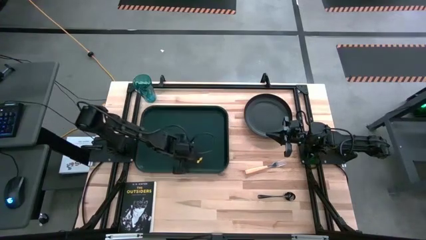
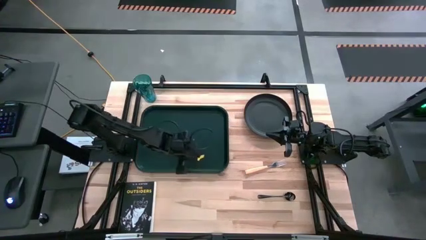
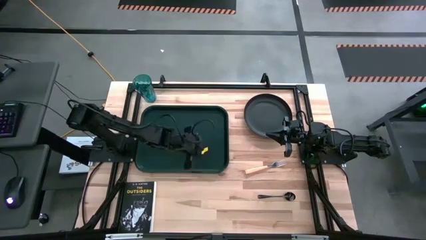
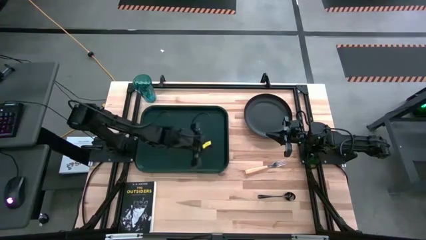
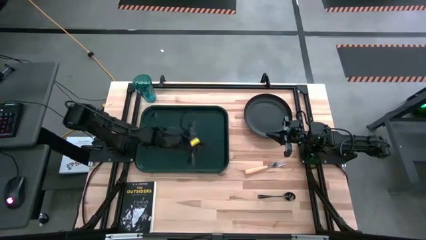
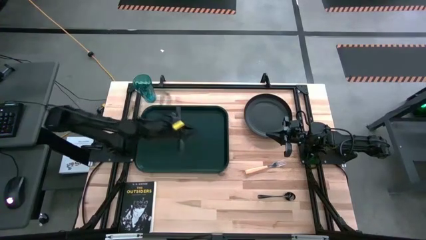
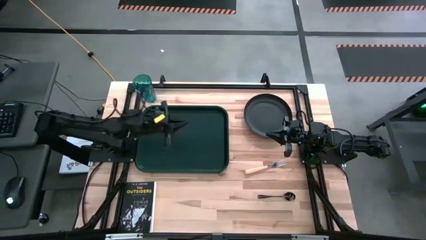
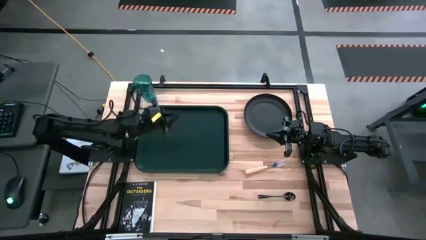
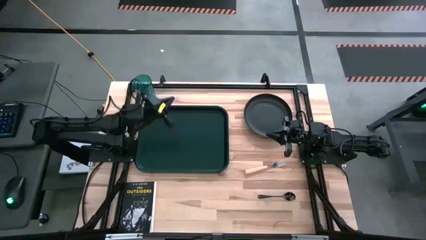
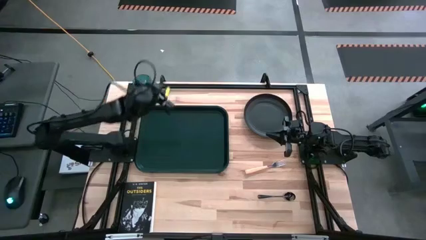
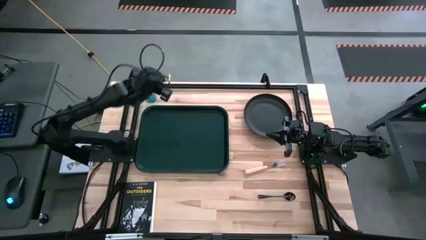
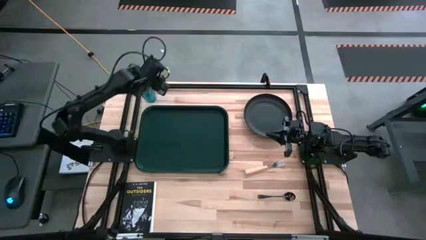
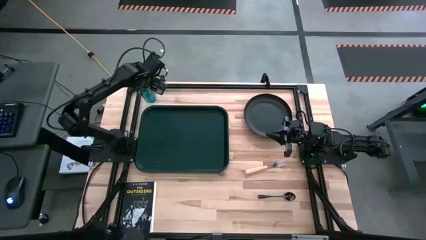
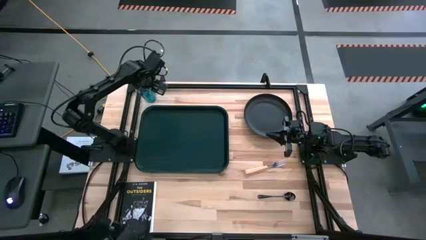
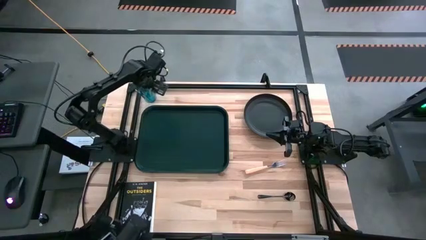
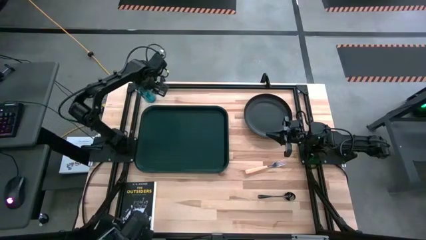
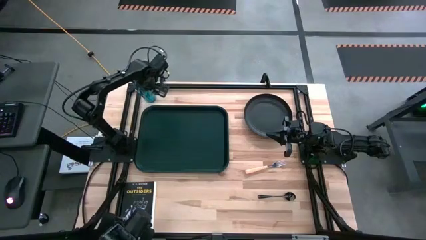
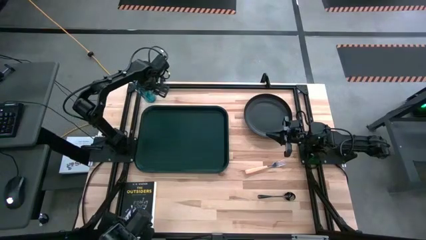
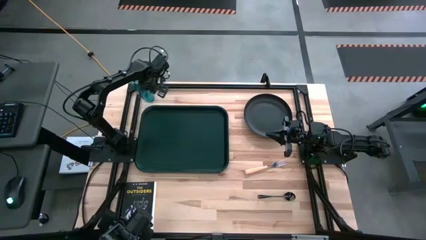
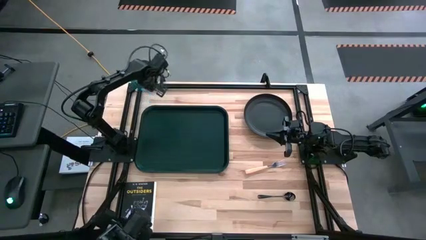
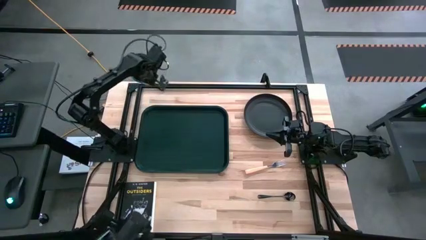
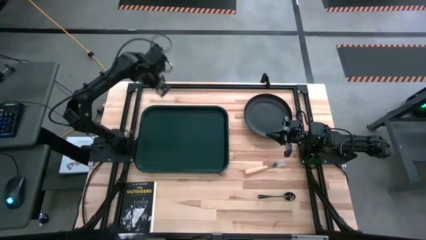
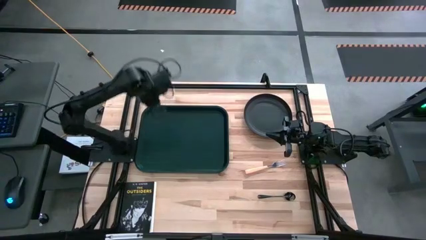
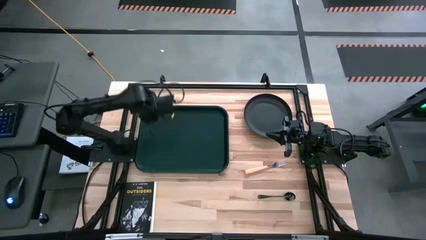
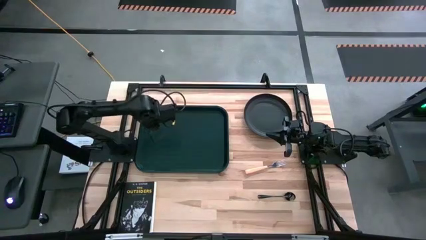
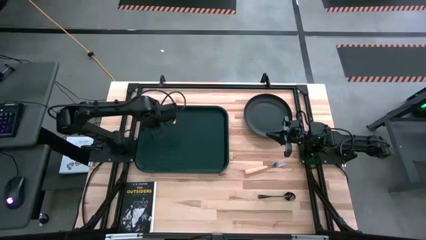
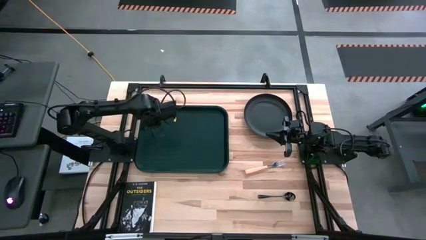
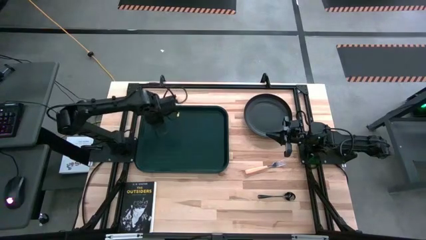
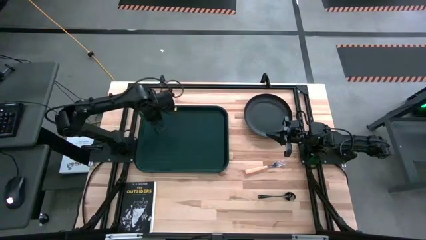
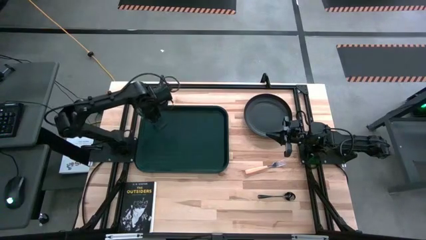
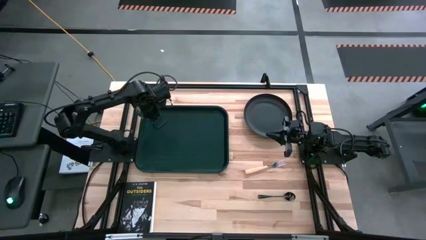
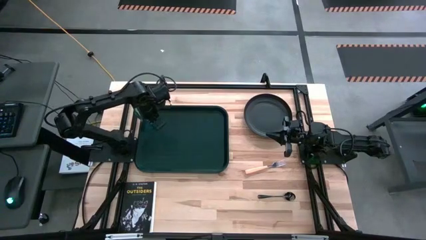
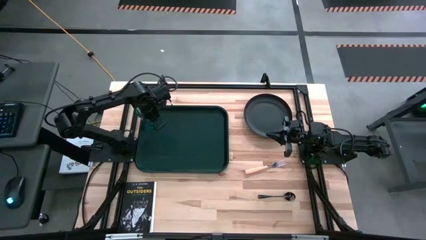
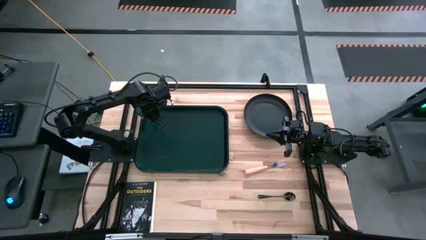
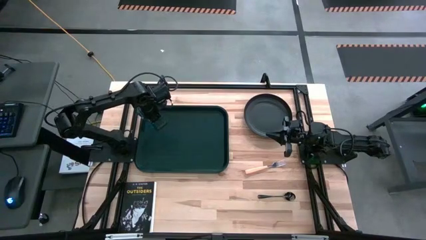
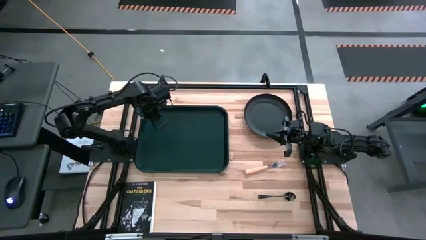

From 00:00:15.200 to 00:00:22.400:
Task: Pick and place plate/cup/fork/spoon on tray
Put the blue cup on the black tray

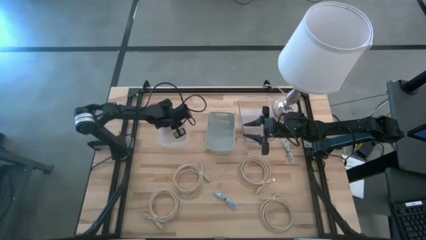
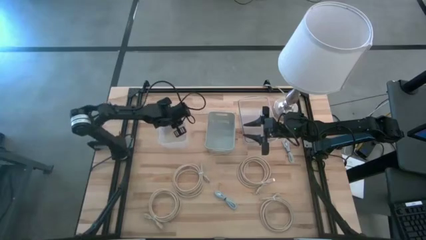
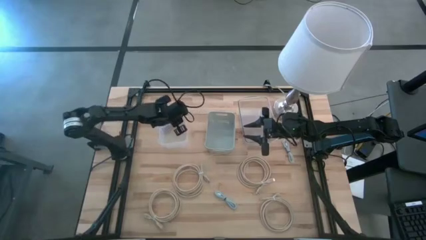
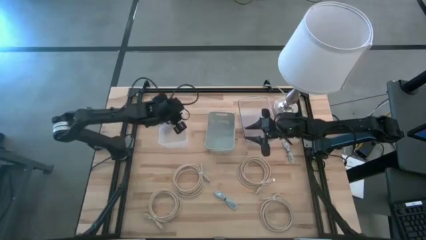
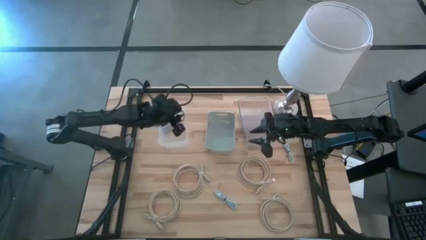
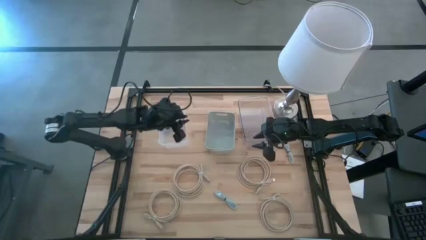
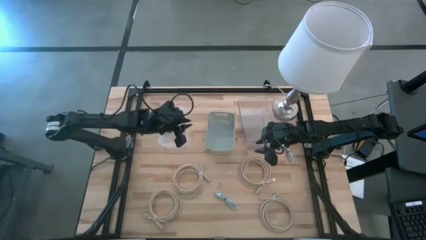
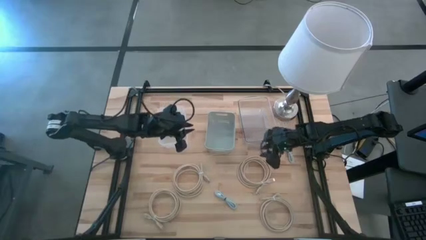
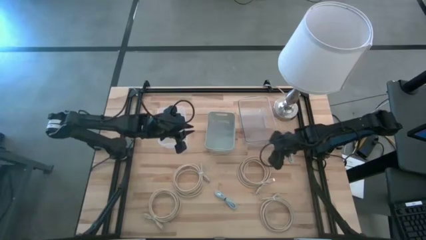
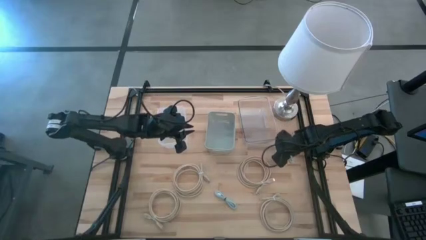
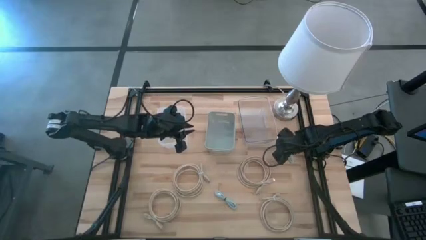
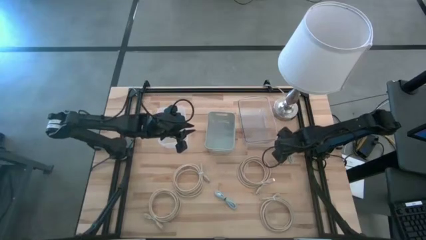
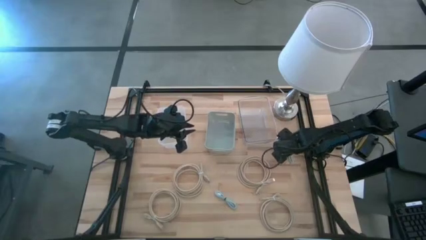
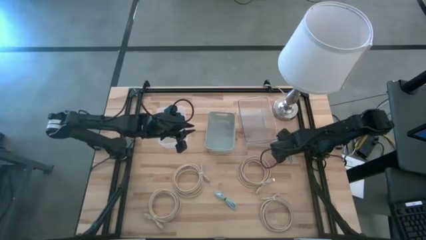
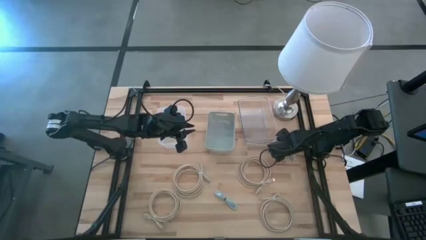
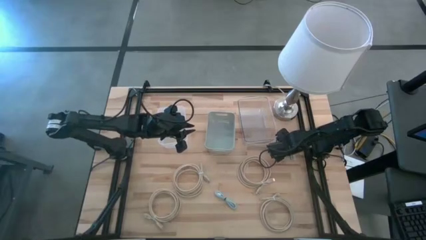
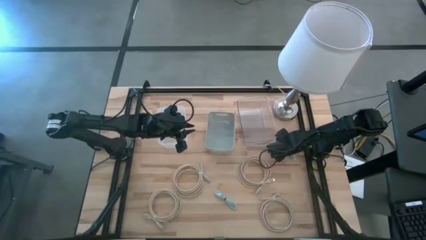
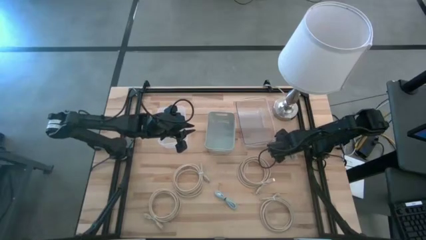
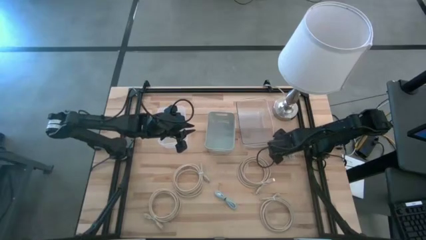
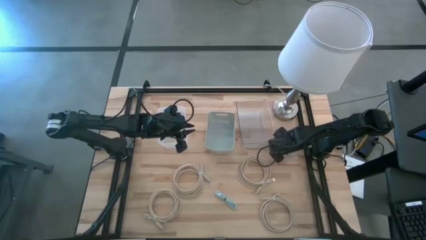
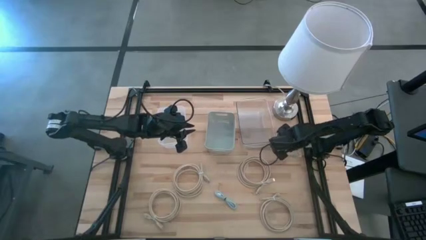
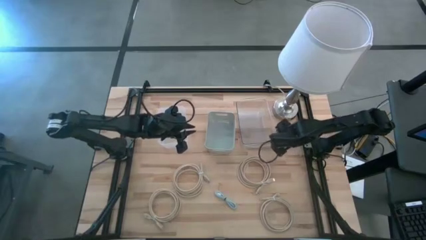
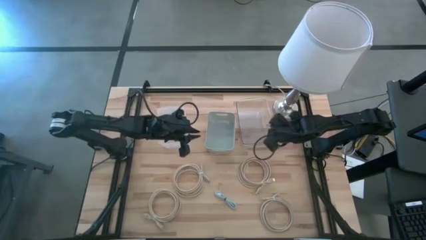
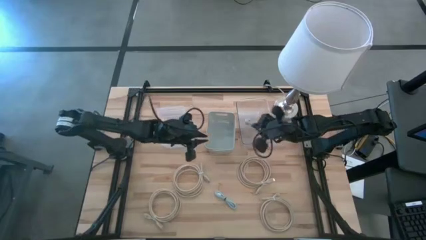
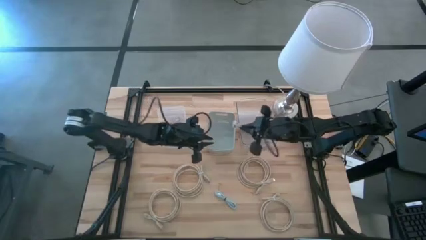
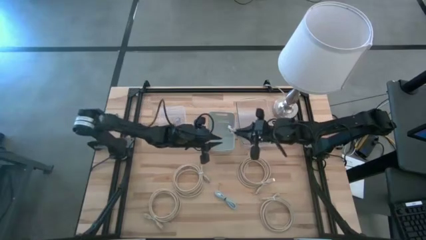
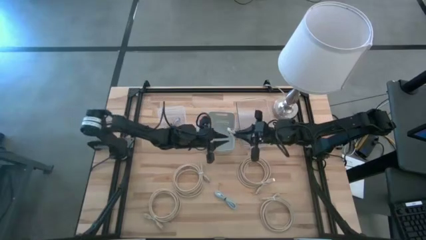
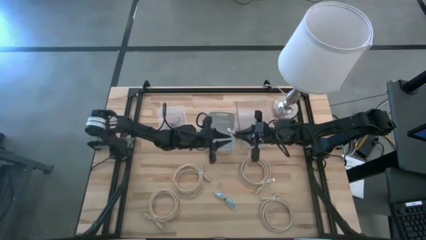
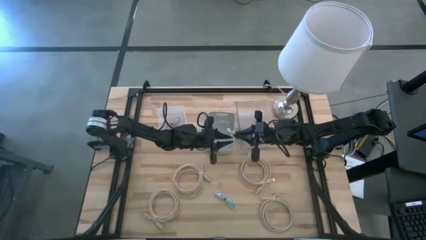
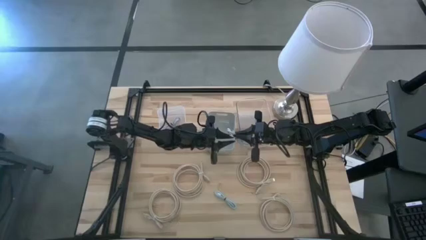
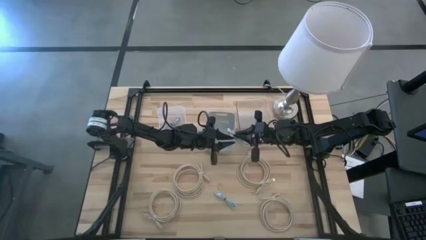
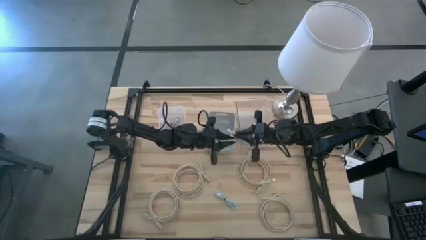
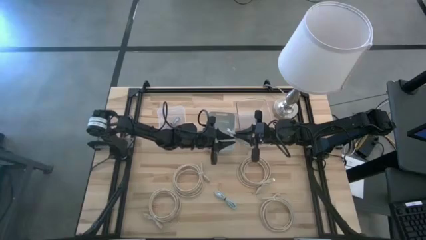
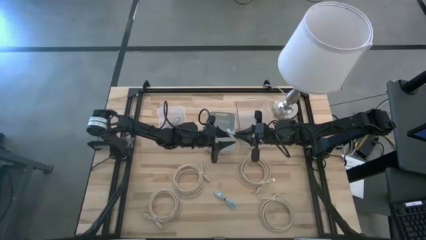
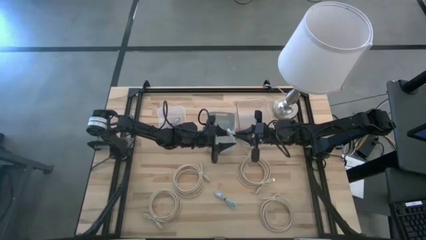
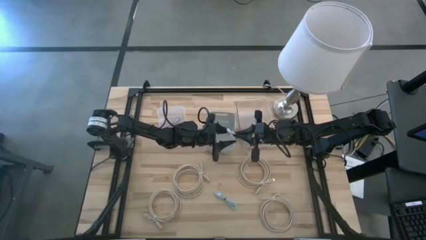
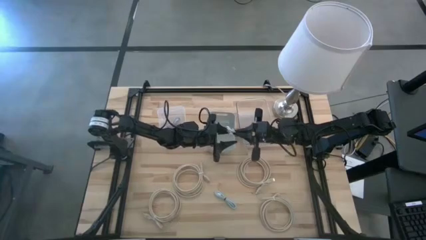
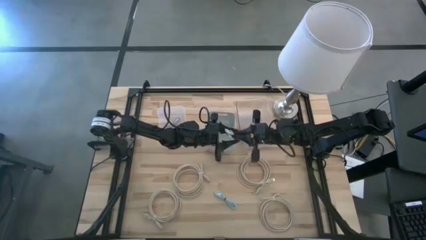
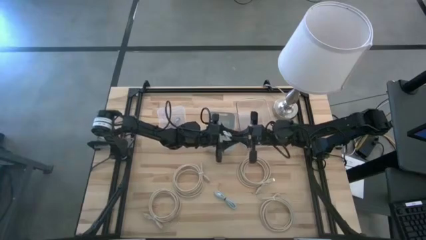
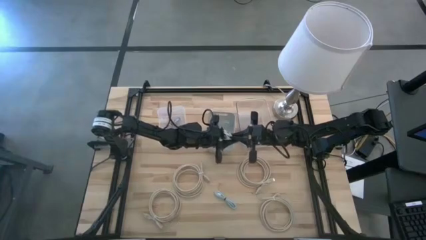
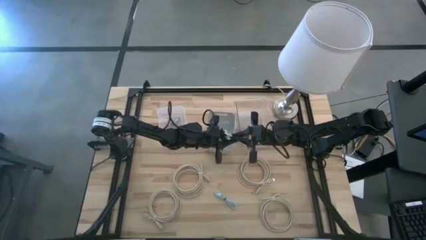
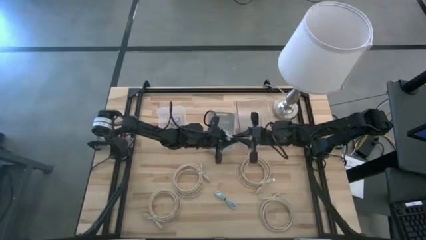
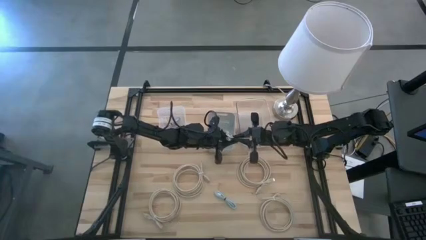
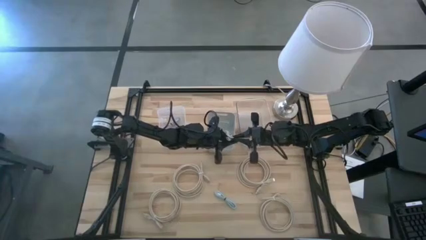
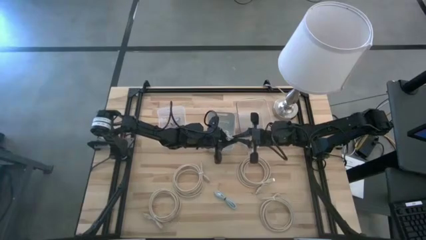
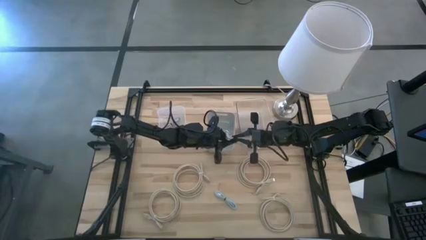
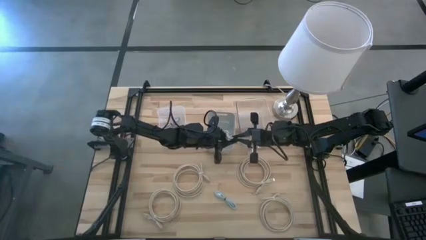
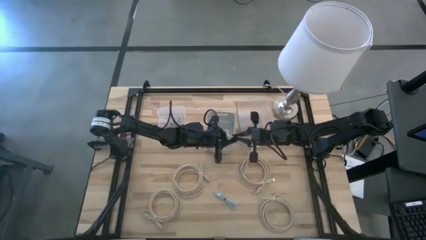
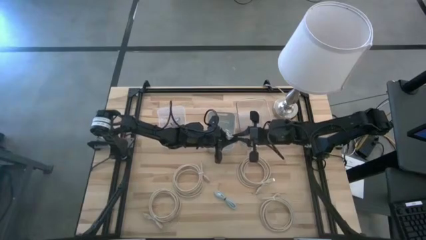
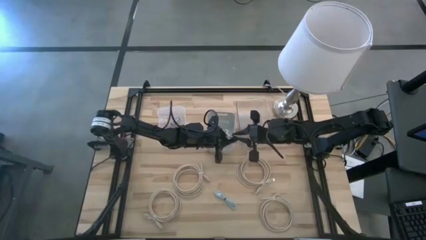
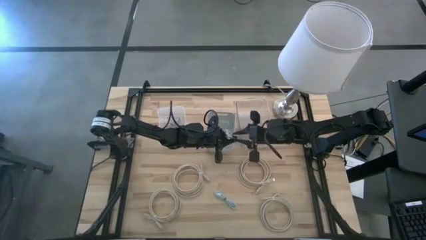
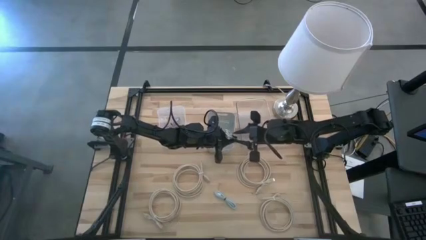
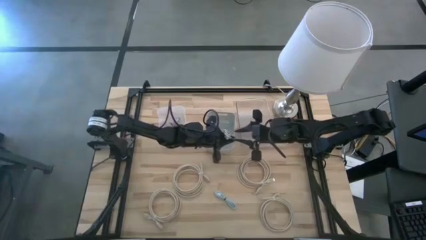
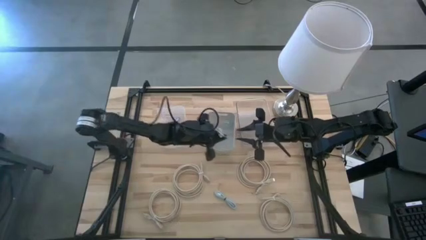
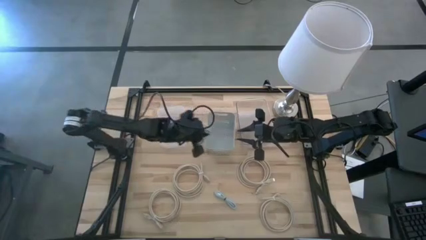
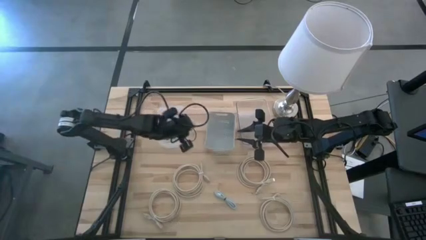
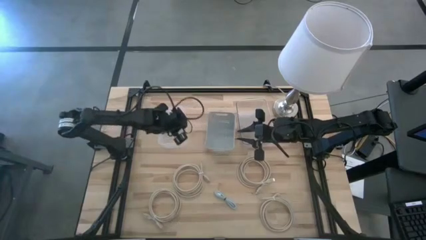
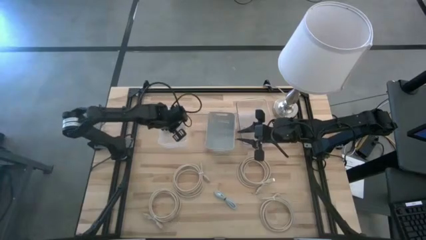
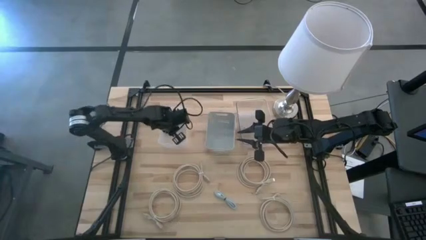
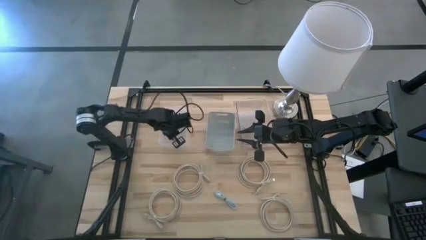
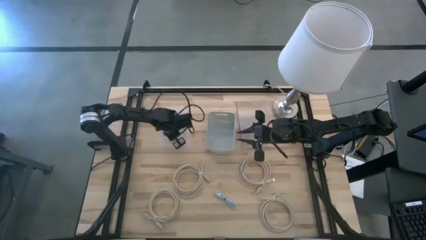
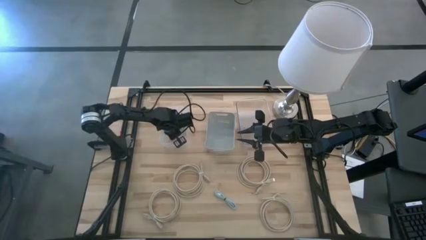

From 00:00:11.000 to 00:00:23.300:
Task: Pick & Place USB Port
Put the white charger cable into the left transparent bin
